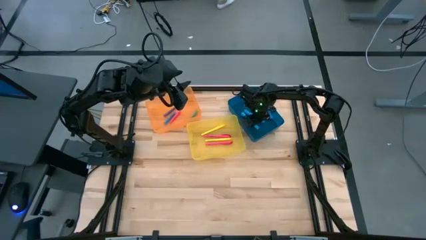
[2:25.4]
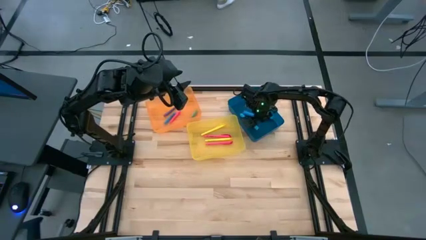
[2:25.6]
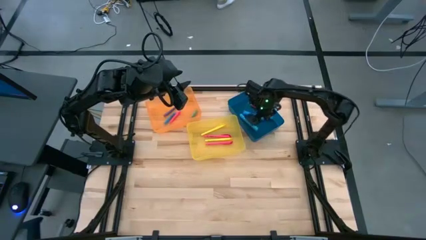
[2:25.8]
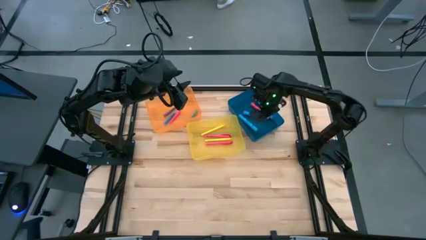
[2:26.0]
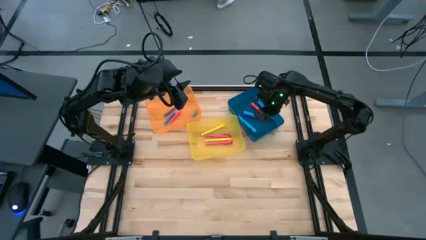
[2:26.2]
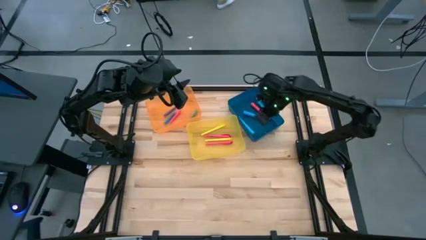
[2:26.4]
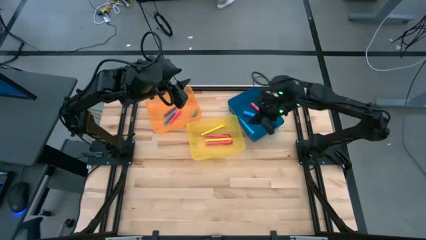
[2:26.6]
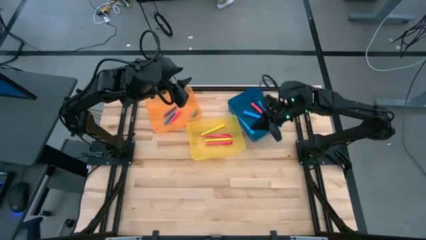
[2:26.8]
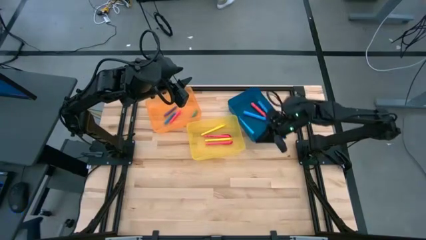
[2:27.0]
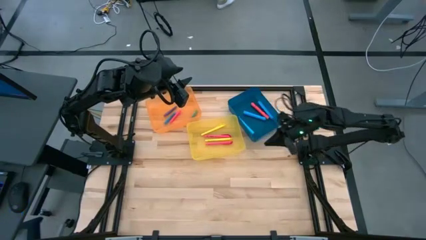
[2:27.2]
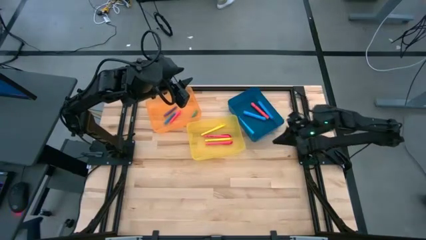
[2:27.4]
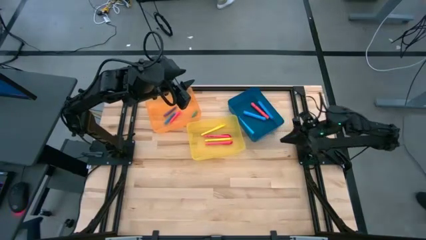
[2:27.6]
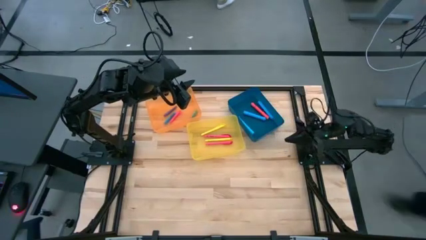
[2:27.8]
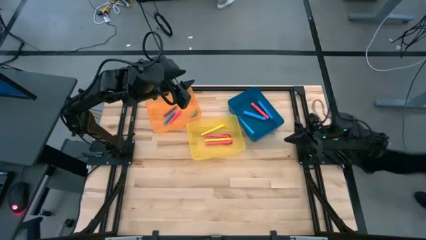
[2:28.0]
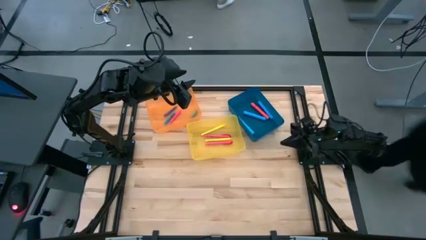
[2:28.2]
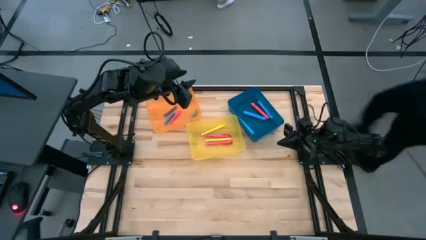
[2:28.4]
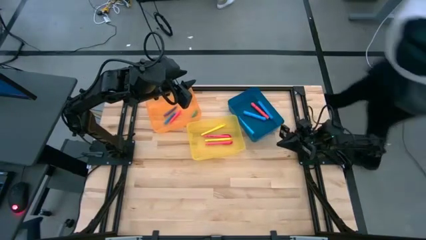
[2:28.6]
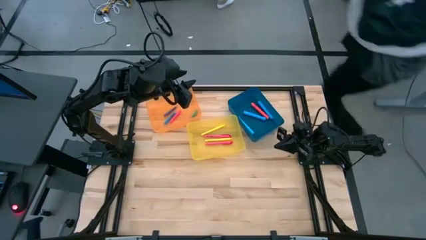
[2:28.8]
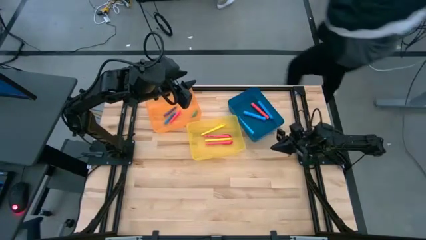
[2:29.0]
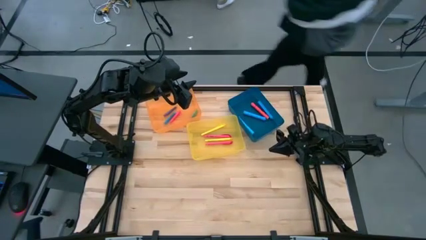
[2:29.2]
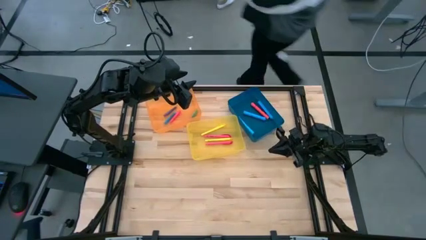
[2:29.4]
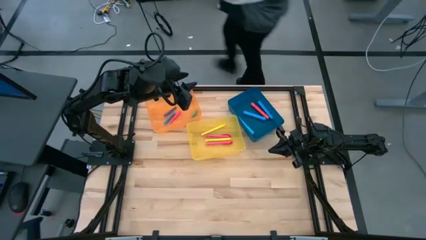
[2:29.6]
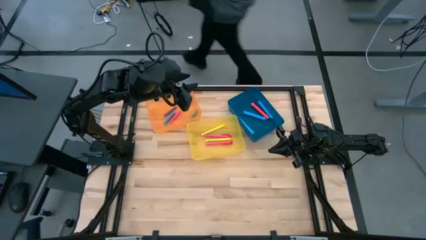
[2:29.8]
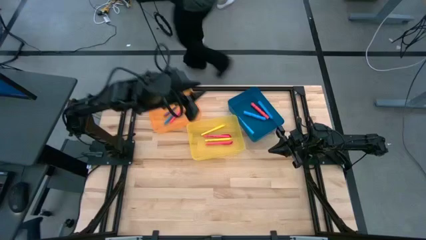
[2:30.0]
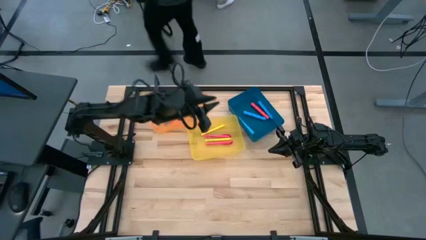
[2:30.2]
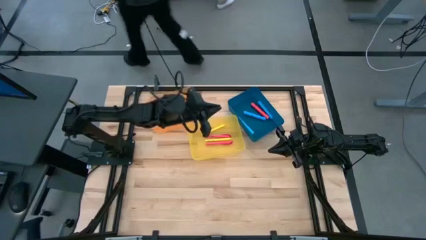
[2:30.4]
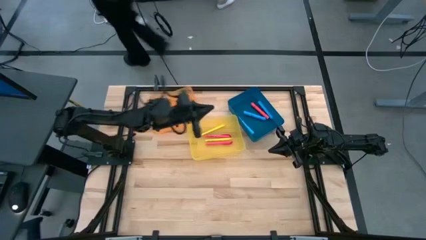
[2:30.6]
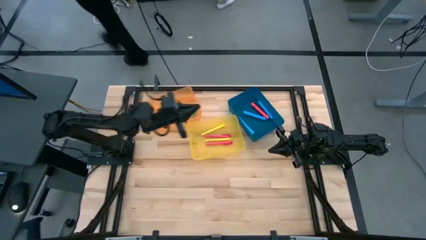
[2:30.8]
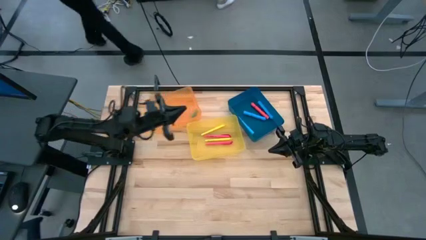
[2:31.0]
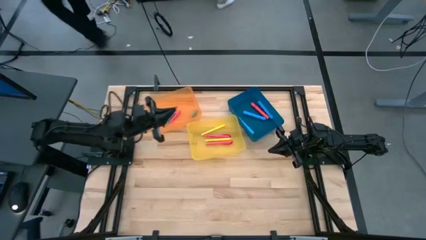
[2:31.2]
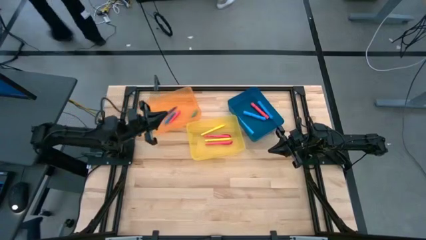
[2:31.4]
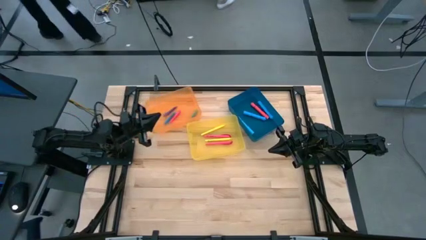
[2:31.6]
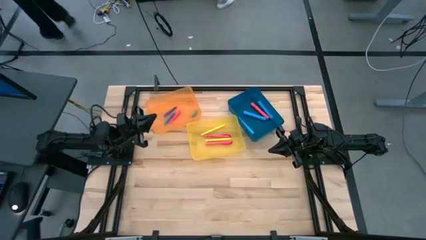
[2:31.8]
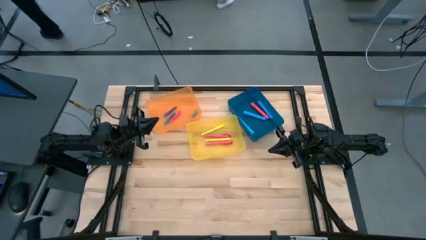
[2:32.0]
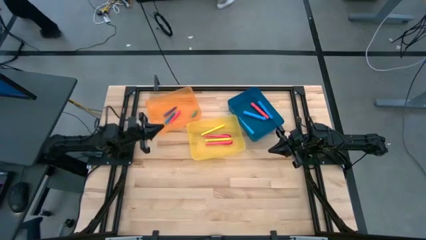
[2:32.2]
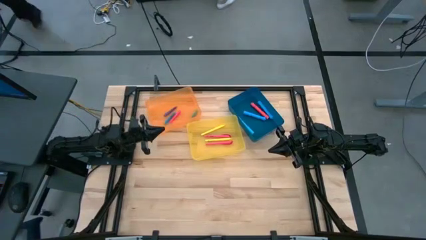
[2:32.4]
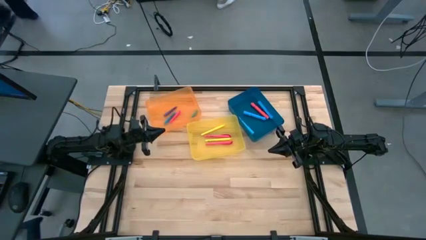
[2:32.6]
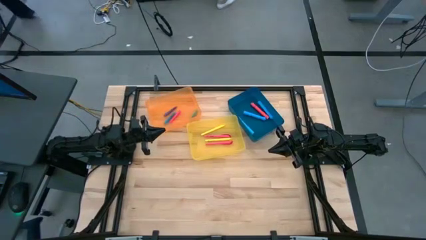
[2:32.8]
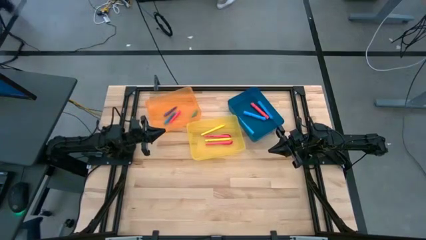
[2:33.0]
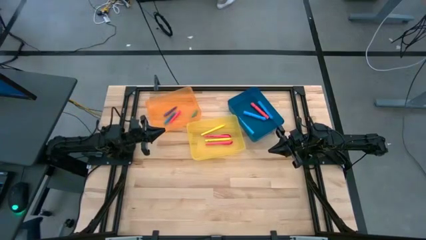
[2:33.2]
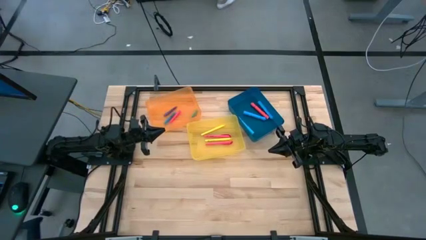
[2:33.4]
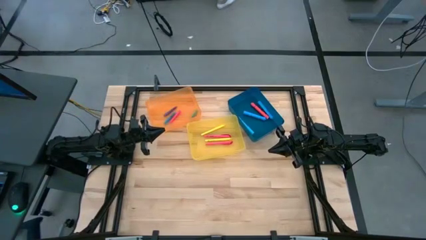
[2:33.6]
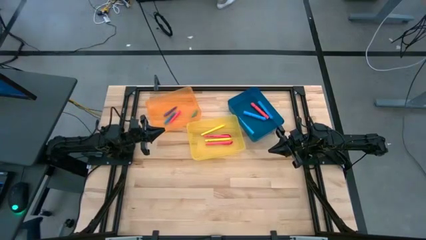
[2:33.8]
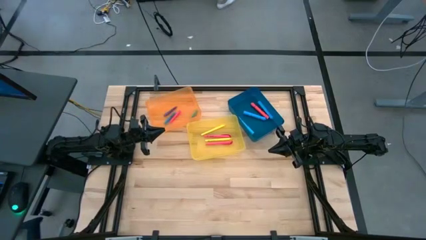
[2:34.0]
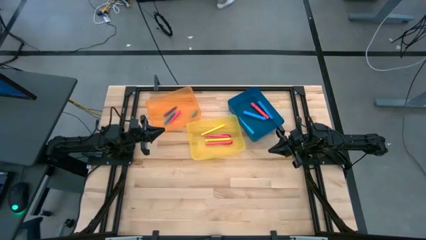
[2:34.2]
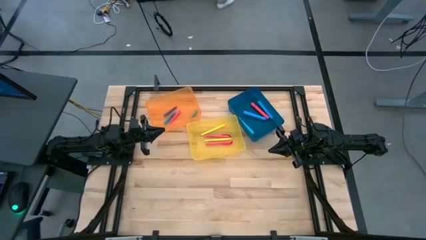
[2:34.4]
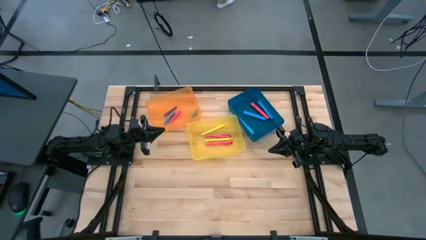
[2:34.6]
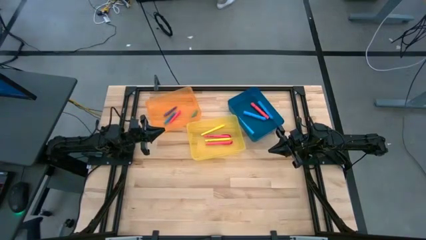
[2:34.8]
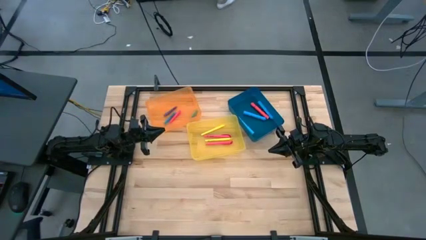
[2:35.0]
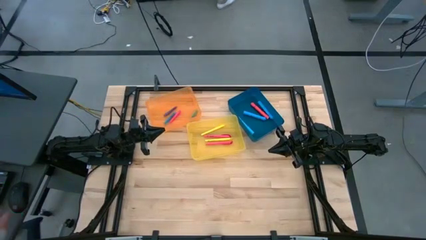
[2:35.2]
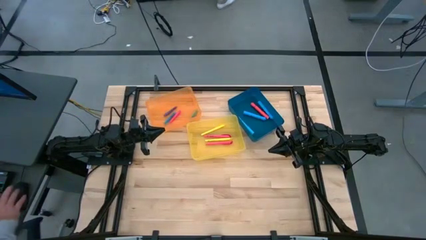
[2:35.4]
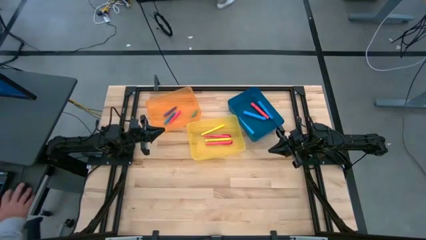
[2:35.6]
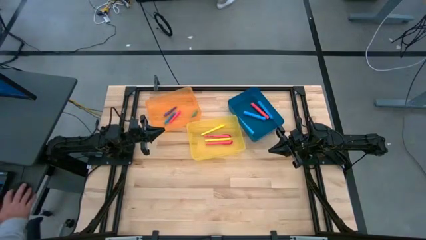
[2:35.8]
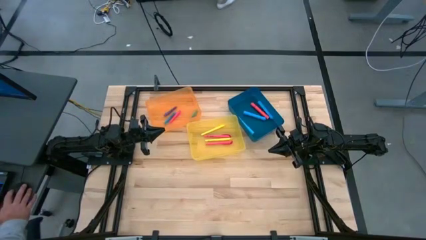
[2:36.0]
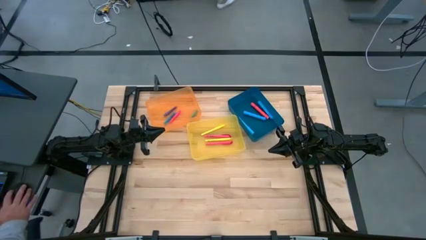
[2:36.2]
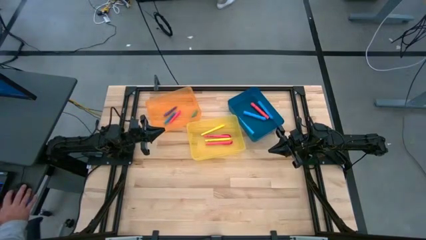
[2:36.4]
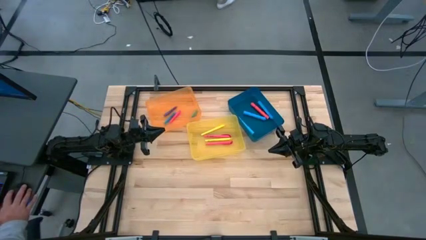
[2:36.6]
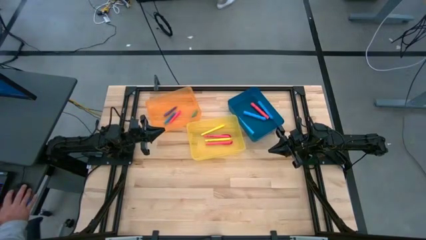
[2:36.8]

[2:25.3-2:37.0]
Task: Pick & Place Markers
Return to Home Position
